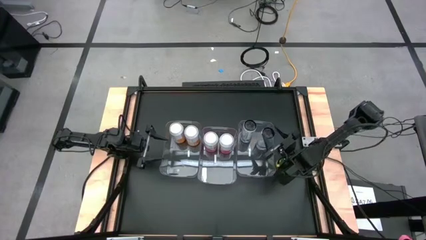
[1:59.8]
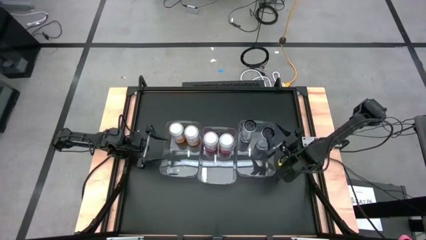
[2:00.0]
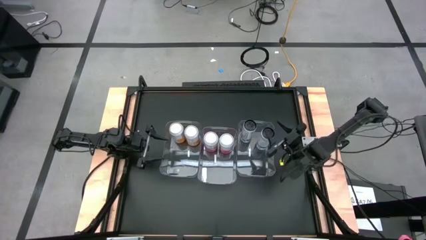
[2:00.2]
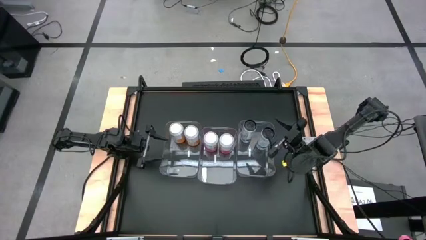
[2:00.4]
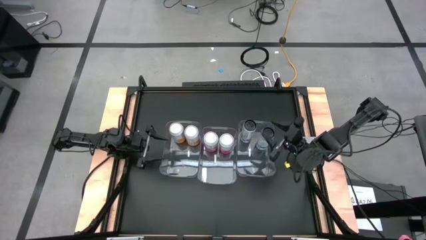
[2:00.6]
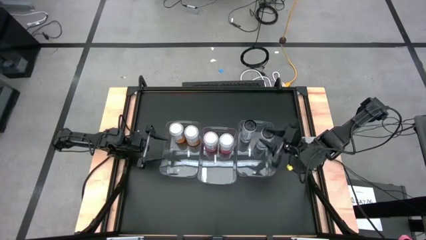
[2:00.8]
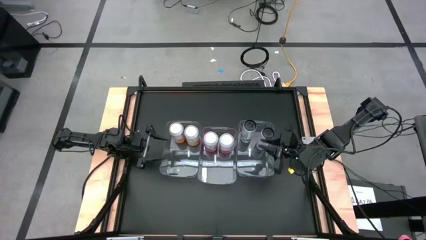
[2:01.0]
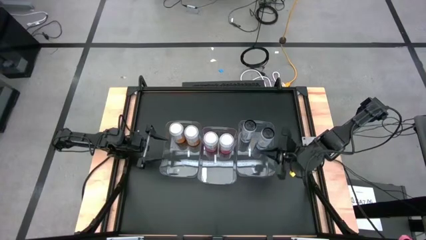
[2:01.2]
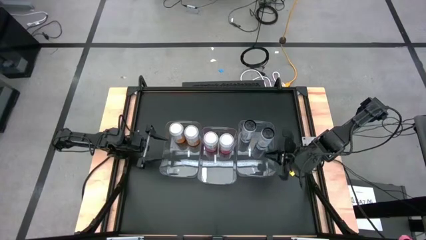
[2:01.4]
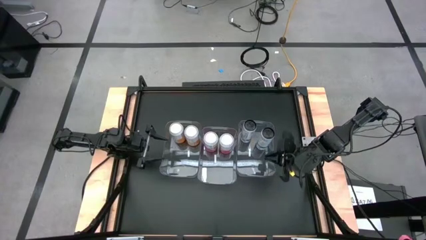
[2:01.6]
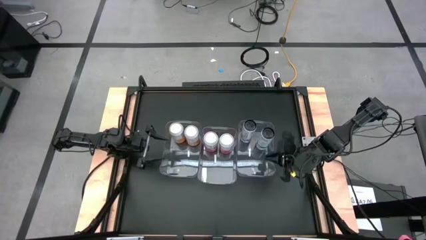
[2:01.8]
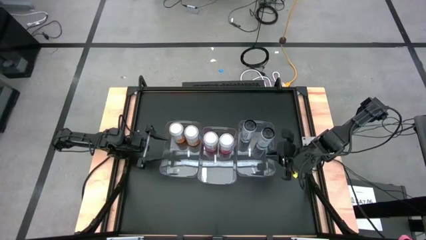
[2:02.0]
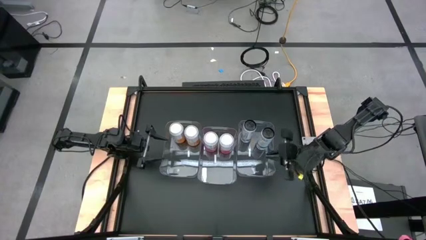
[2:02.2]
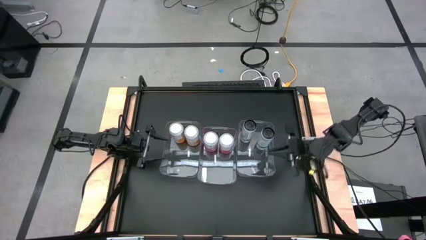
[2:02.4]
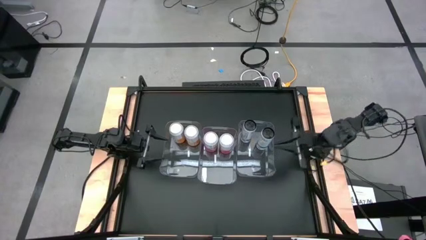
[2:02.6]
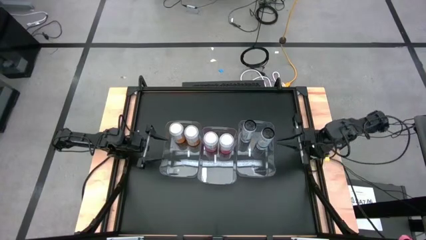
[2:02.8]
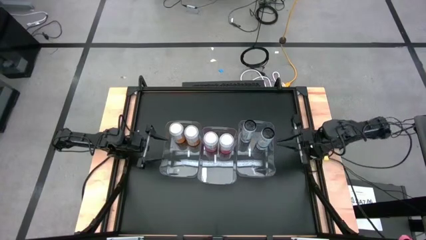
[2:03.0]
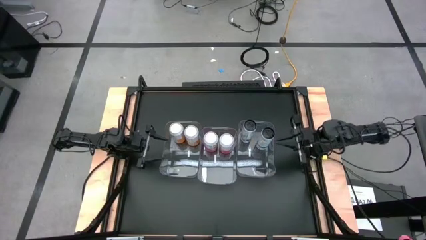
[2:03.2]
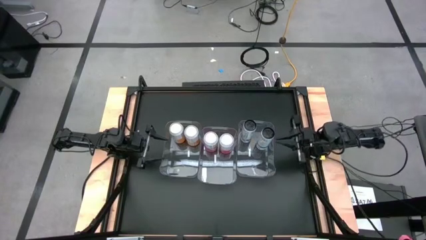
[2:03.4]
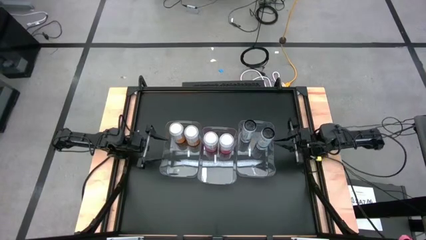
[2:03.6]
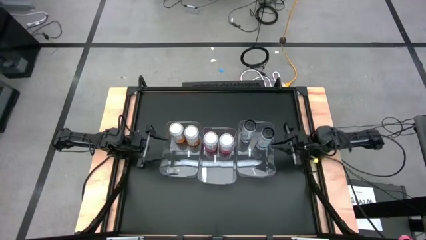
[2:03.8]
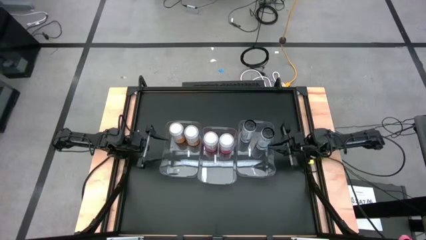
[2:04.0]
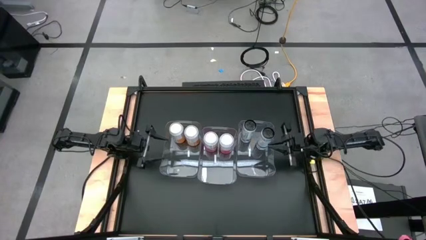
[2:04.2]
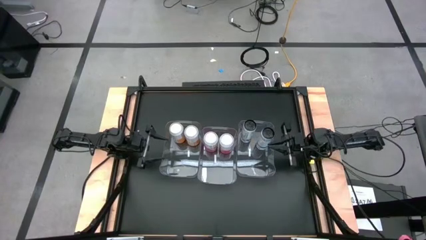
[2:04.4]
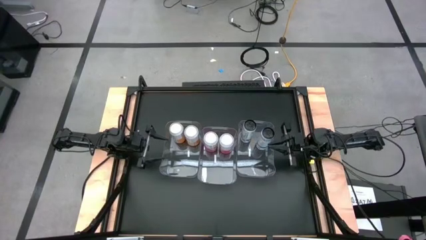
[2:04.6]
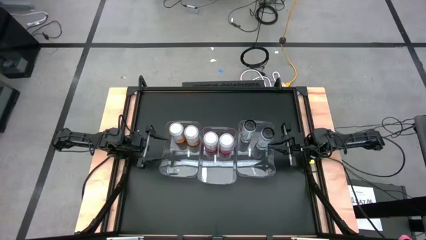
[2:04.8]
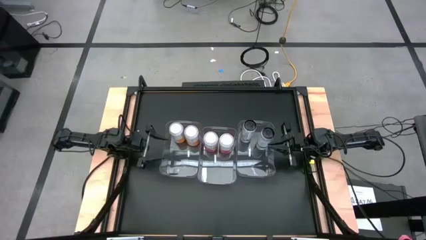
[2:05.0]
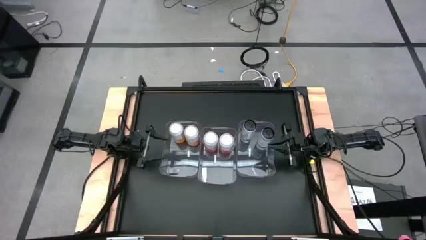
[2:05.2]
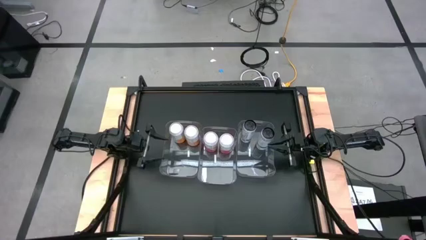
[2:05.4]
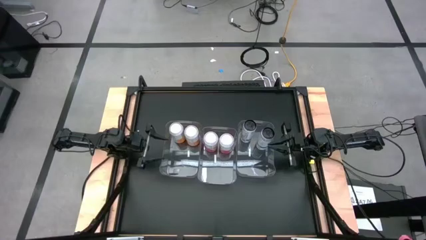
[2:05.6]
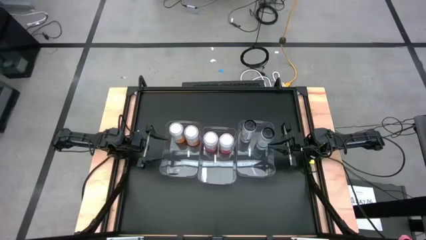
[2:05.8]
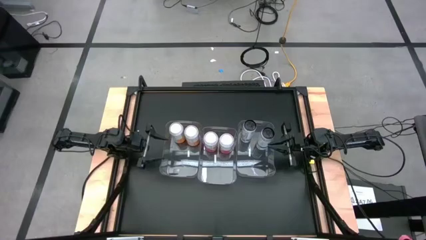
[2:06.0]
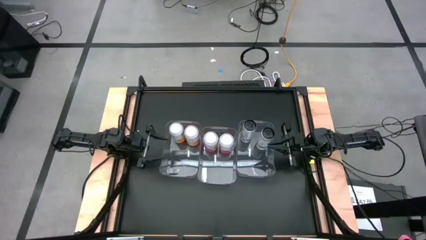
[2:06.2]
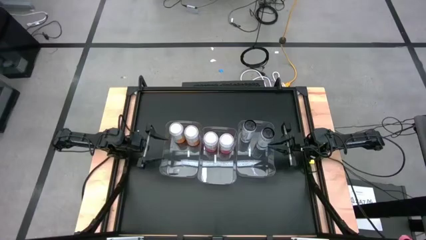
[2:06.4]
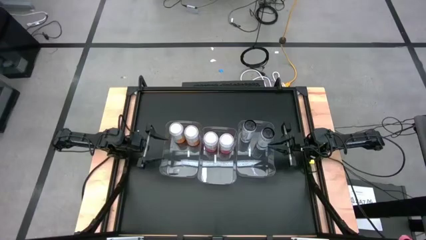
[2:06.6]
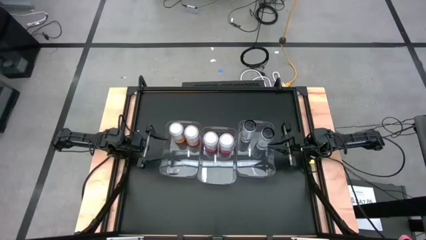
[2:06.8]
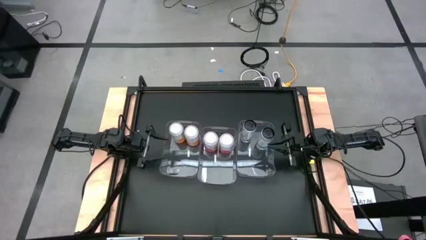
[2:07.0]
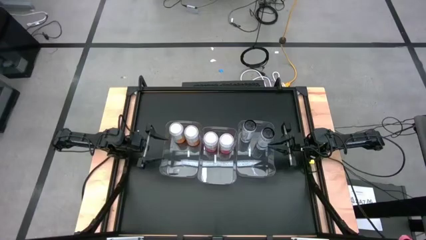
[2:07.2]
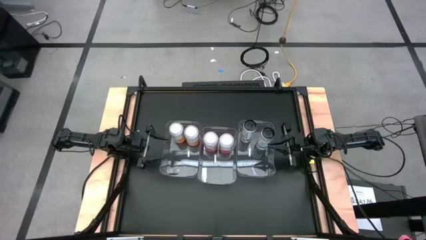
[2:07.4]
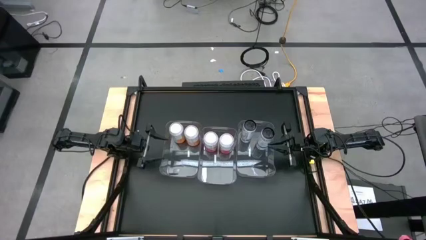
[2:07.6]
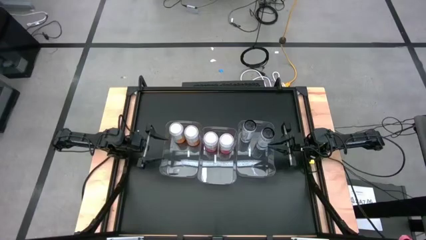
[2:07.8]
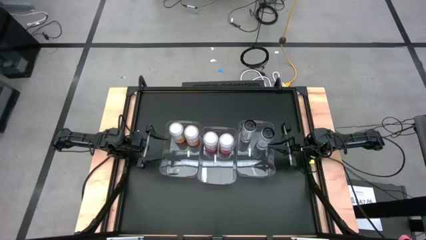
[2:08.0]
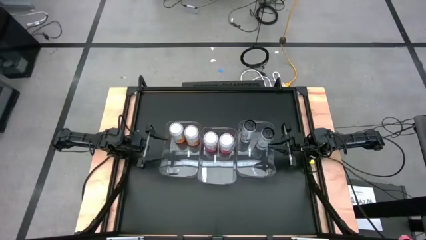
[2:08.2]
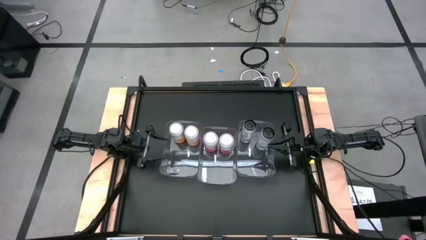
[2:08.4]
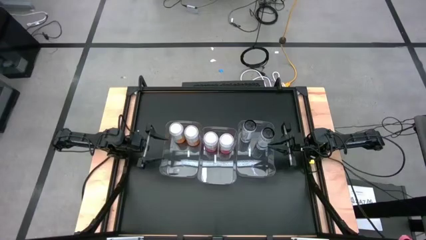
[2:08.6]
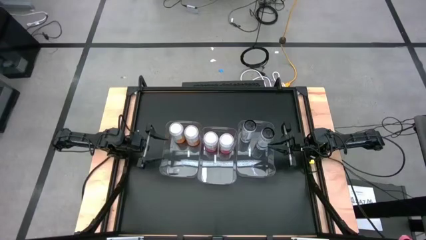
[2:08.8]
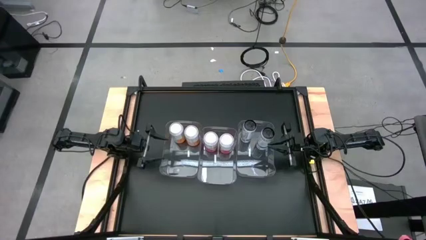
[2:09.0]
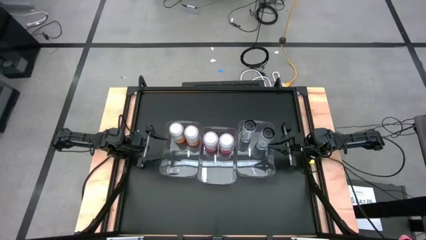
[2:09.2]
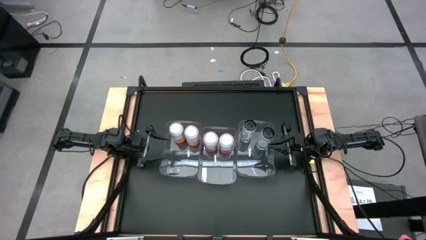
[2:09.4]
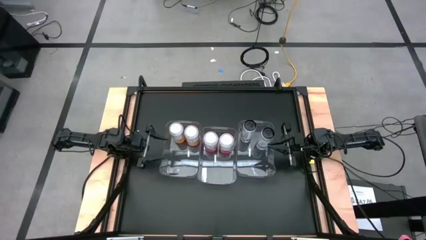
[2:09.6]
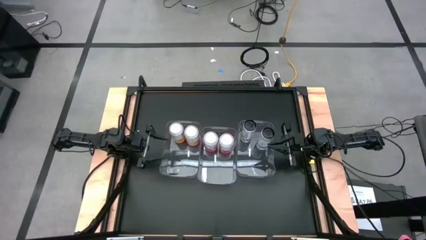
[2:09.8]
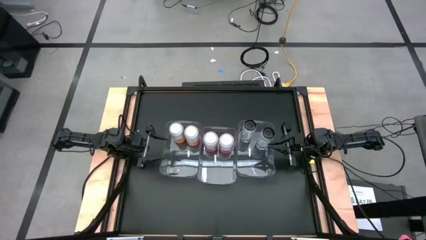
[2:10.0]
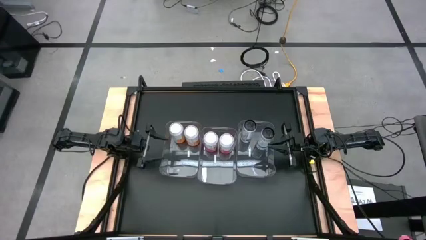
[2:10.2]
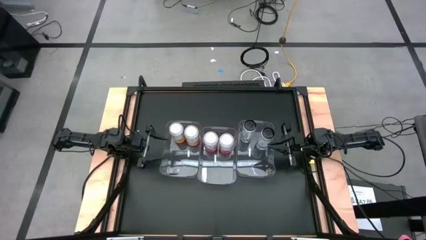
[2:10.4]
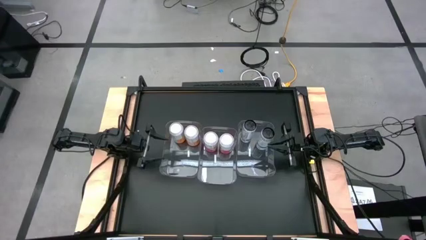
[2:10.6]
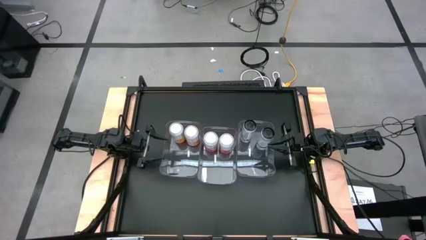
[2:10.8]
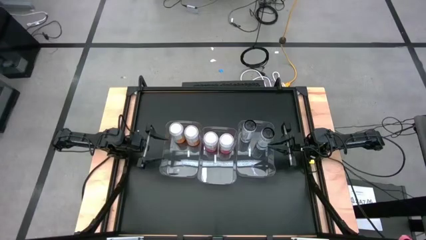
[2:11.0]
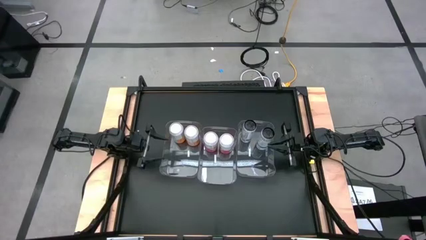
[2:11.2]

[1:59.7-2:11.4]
Task: Sort soda cans
Return to Home Position
